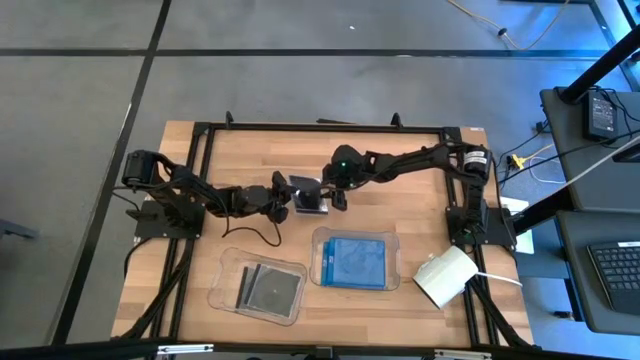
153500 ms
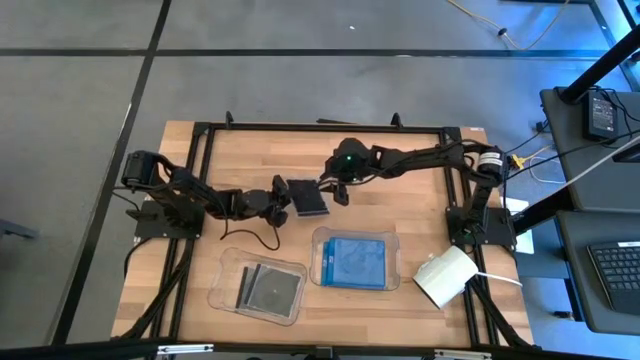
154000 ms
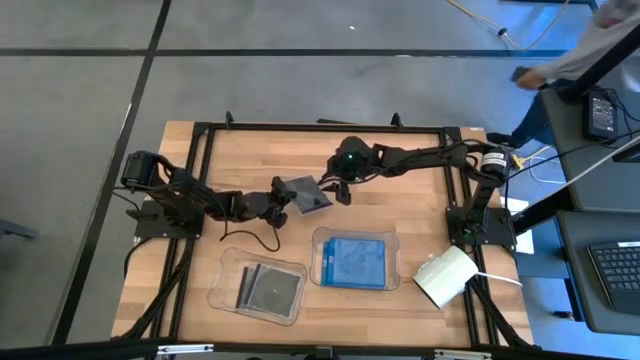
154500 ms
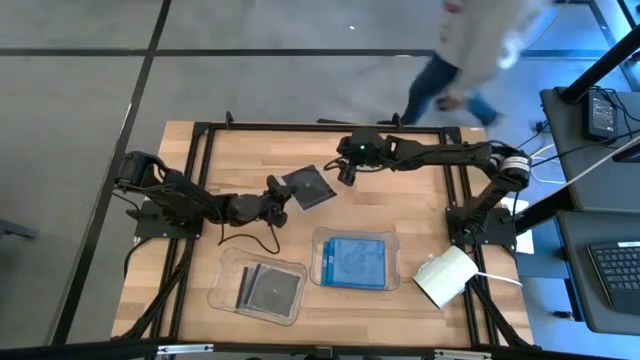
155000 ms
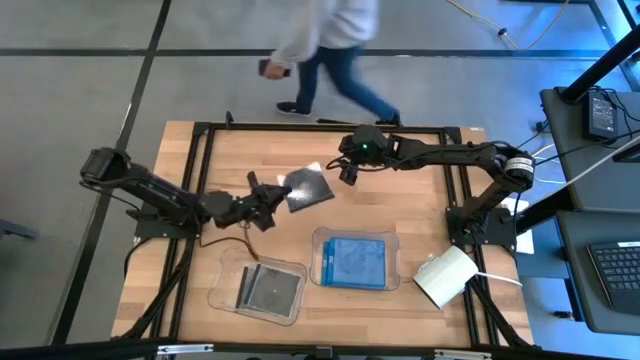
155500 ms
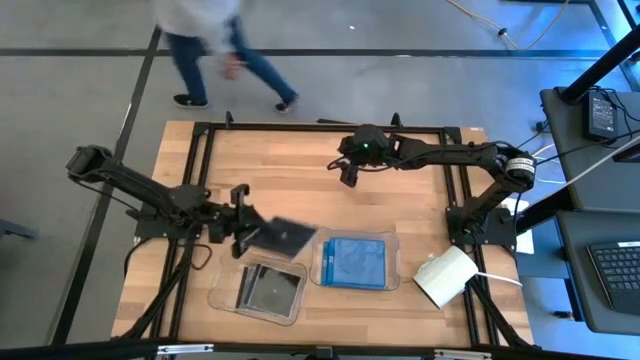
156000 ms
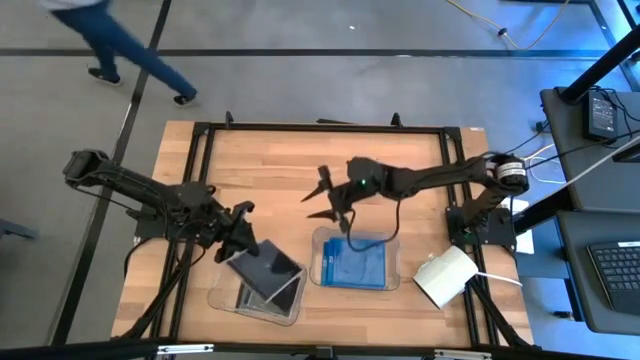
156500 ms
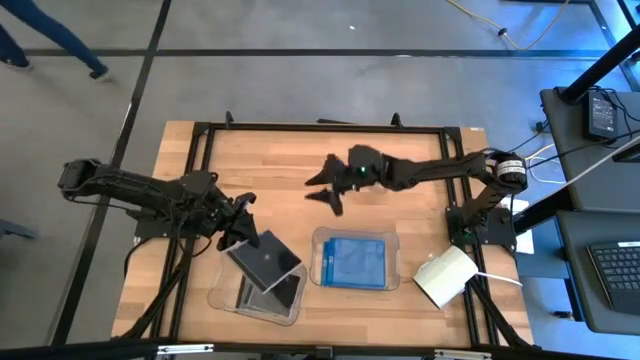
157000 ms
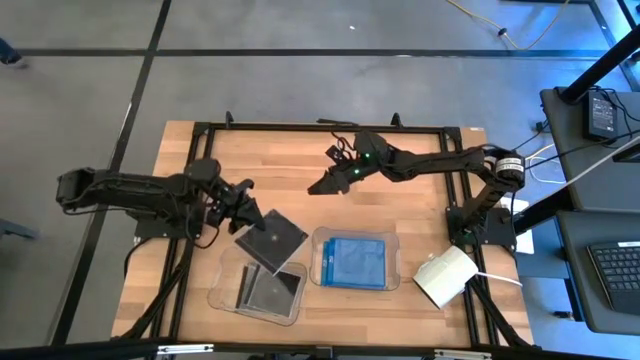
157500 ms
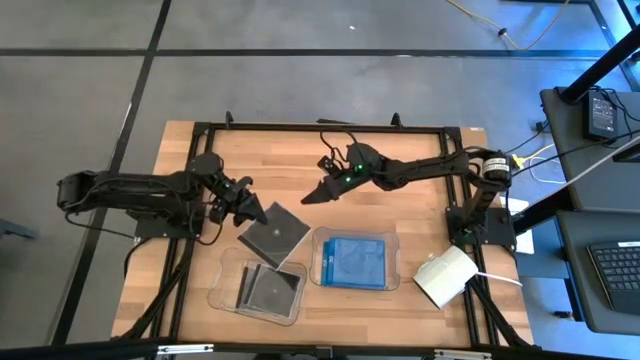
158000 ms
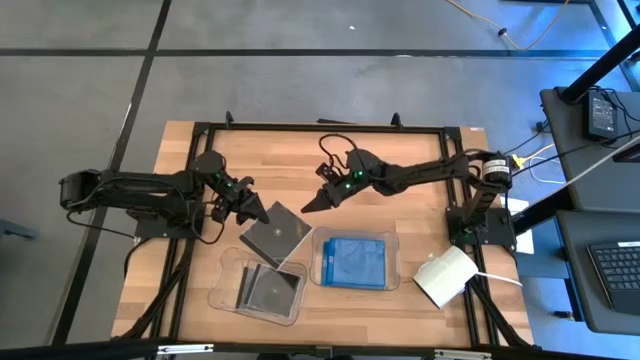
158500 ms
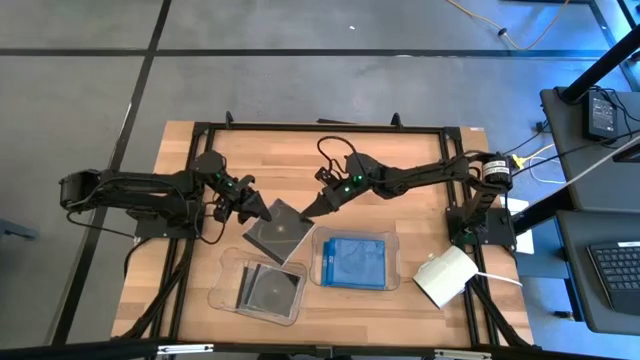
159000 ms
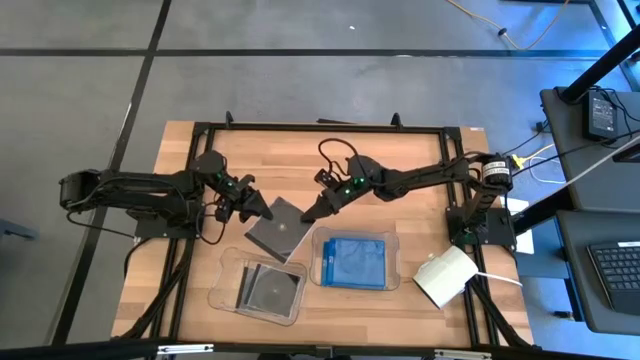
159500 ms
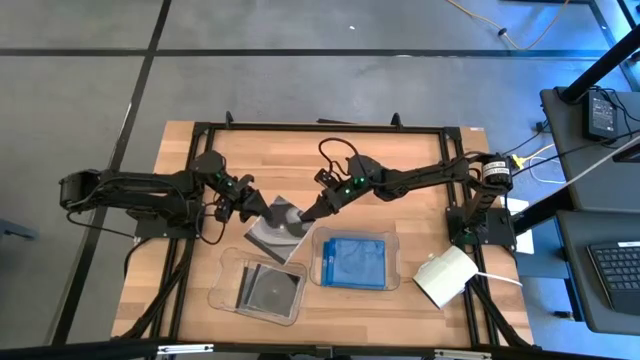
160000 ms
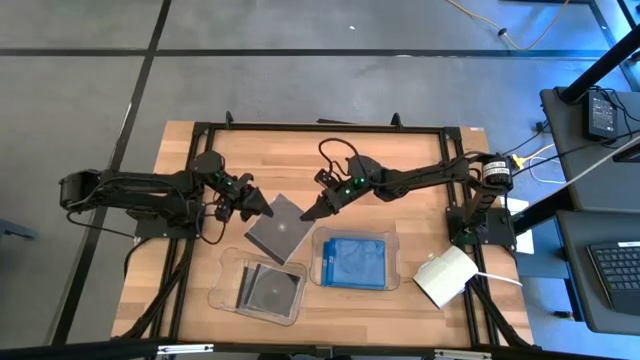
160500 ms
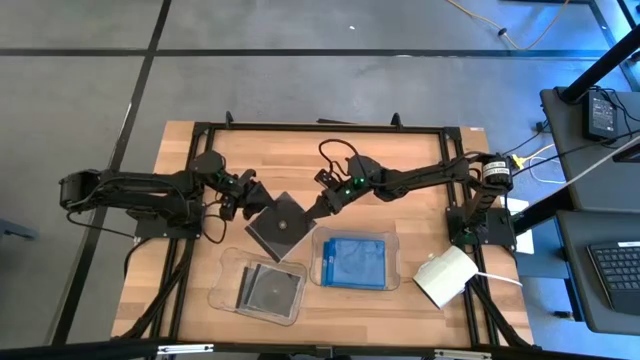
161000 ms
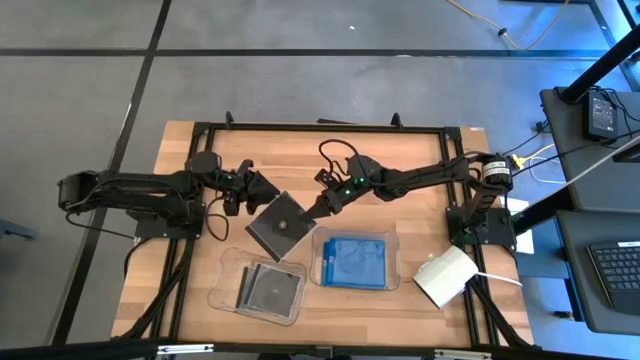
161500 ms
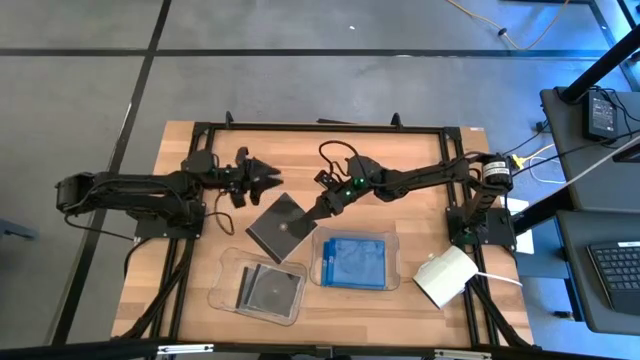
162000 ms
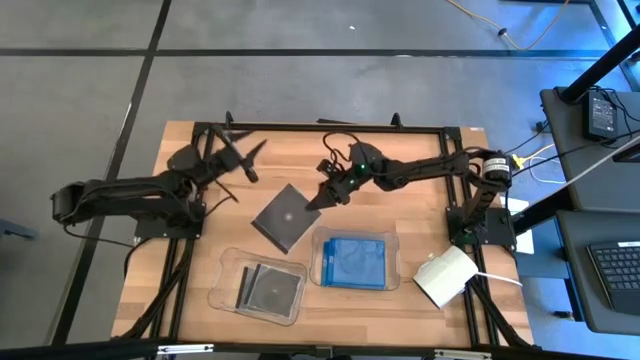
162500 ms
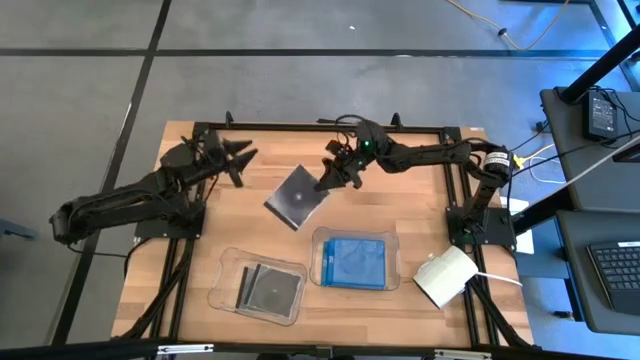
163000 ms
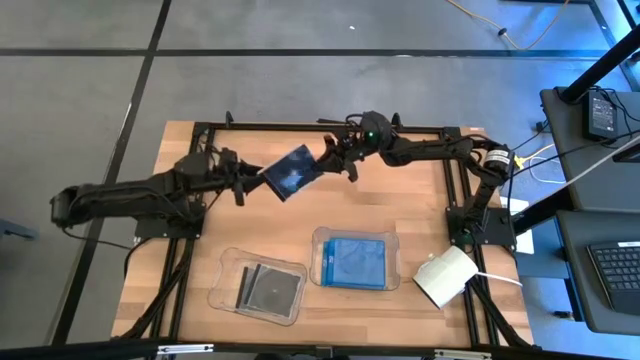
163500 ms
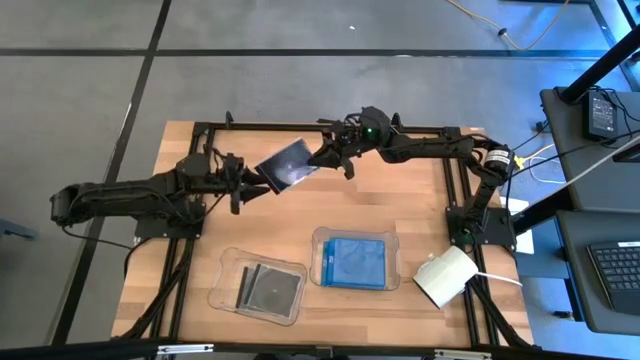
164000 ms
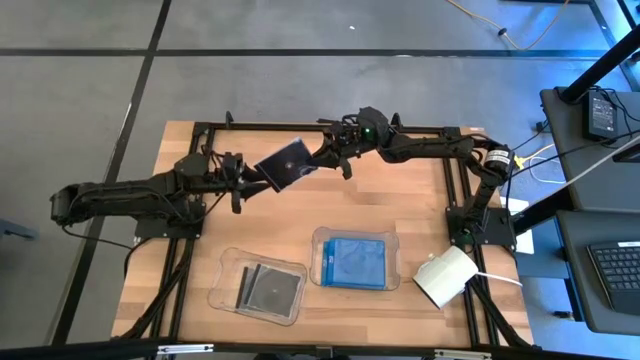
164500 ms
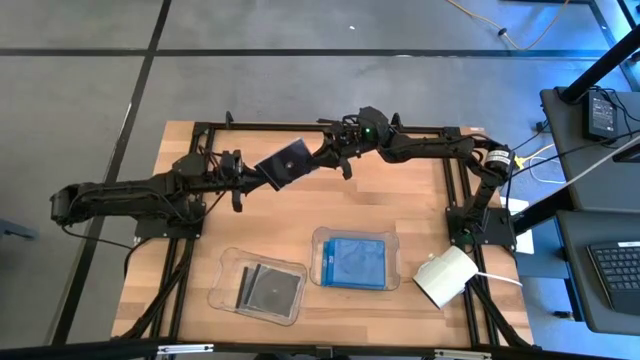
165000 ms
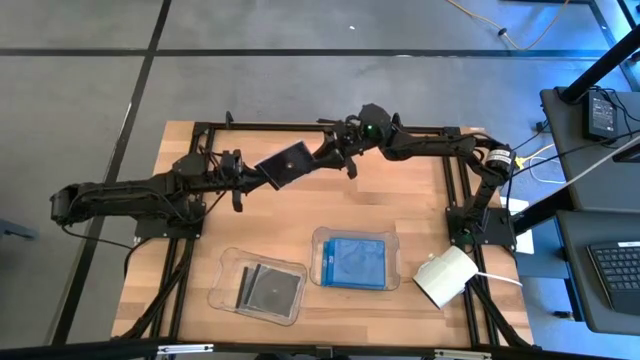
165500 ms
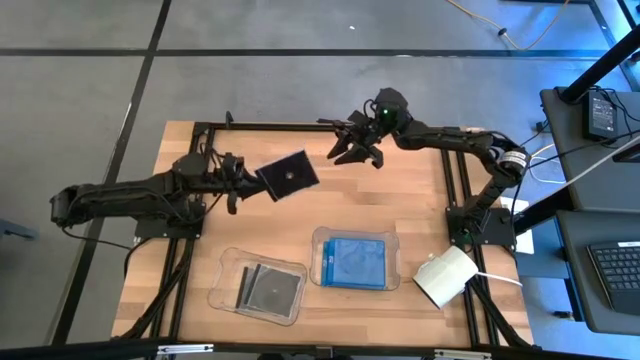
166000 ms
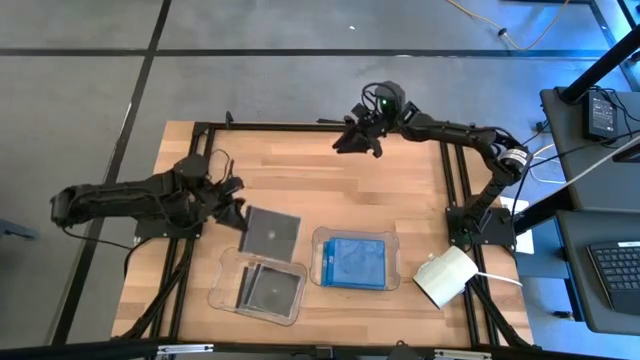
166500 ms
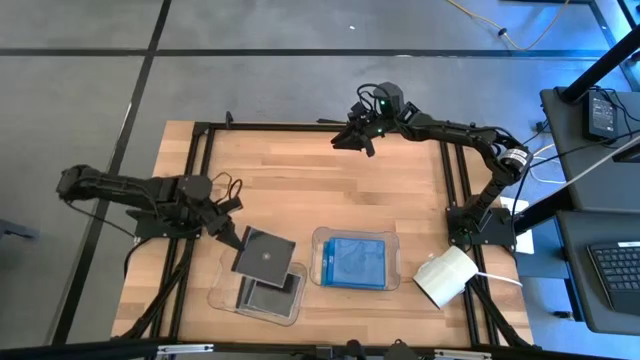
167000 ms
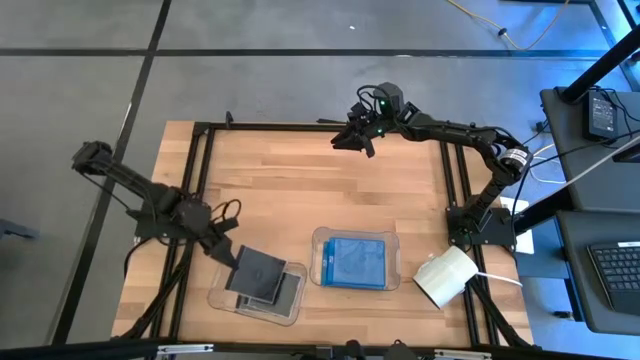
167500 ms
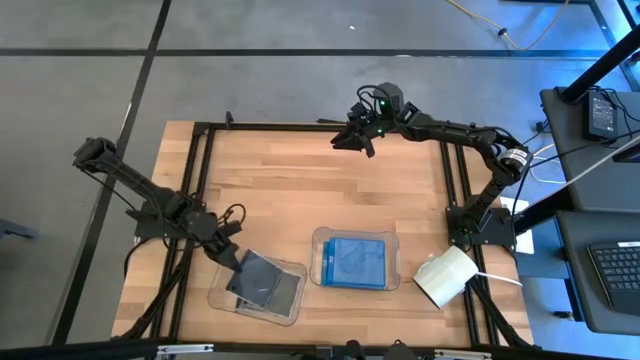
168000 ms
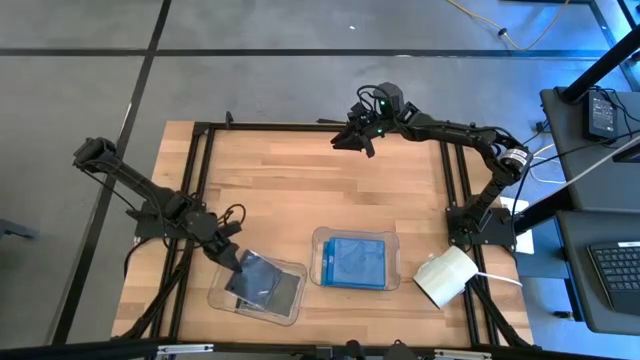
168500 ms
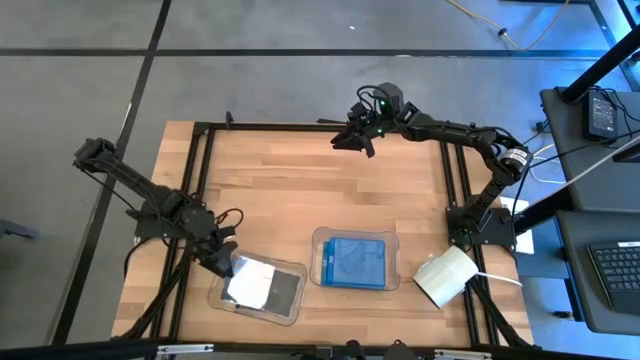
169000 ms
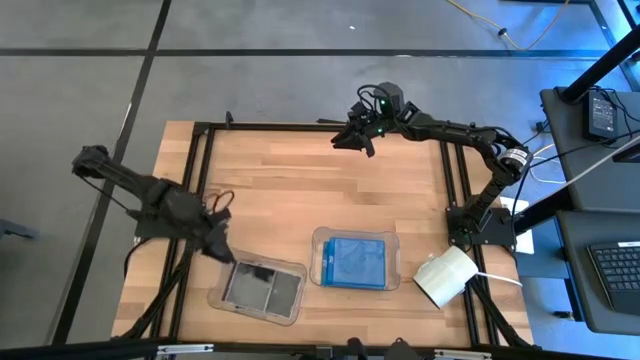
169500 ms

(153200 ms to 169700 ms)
Task: Pick & place jewel cases by type
Put the black CD case into the left transparent bin

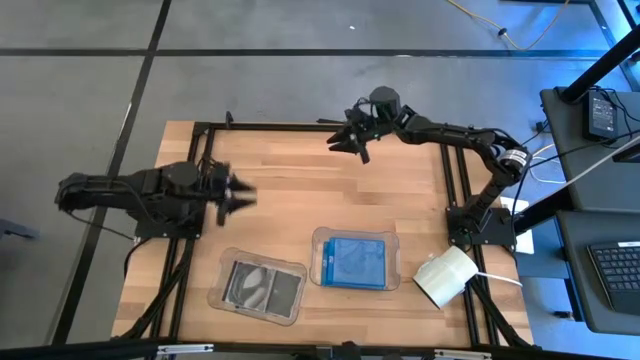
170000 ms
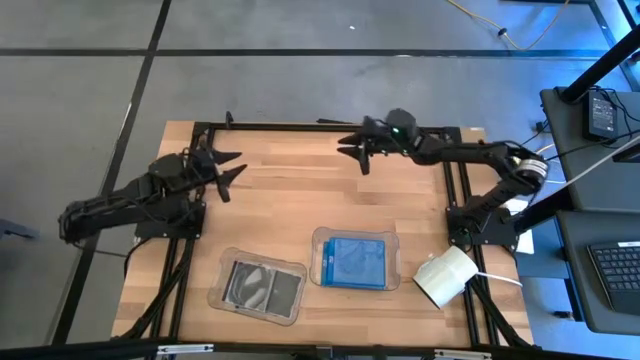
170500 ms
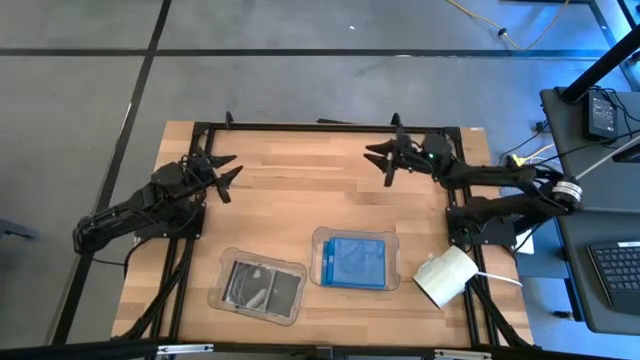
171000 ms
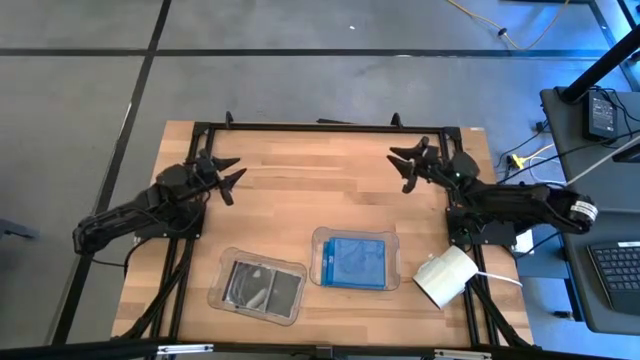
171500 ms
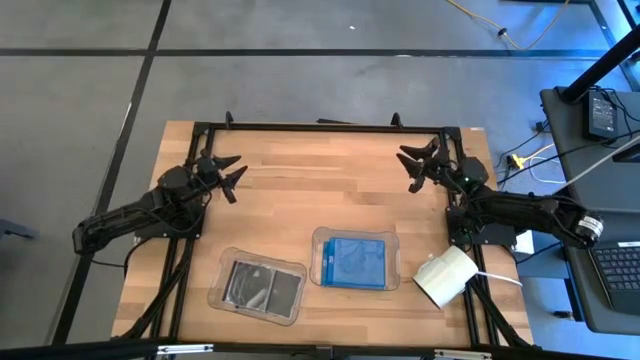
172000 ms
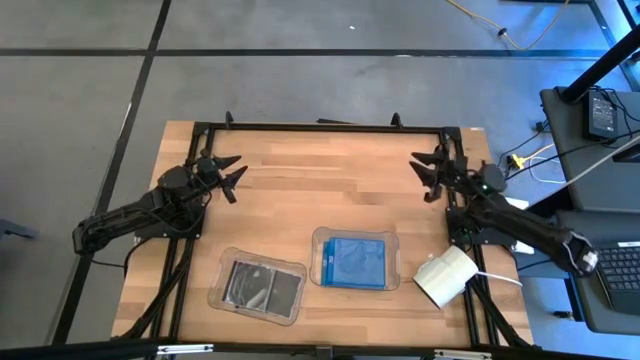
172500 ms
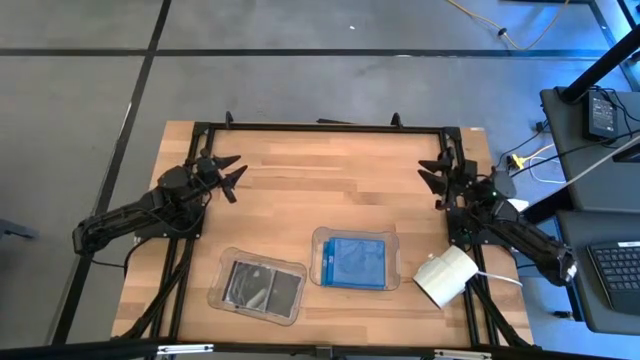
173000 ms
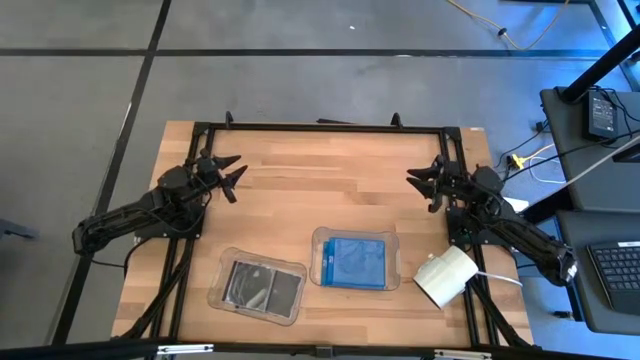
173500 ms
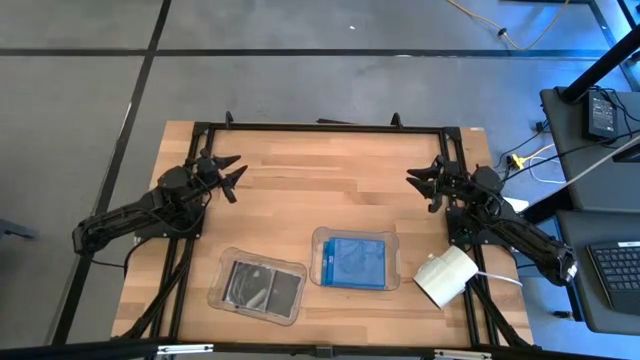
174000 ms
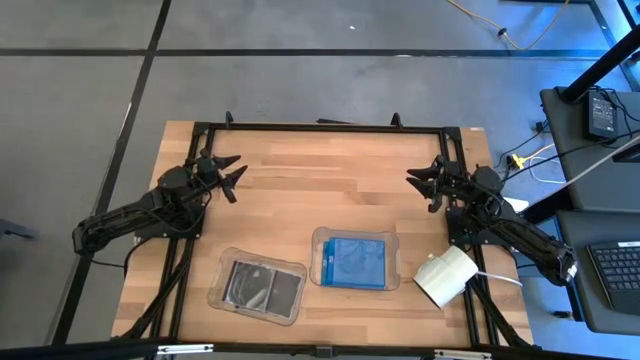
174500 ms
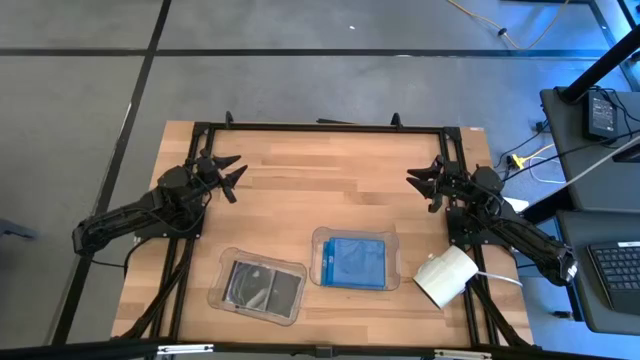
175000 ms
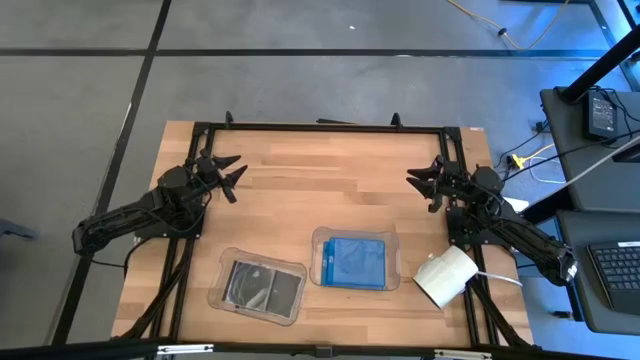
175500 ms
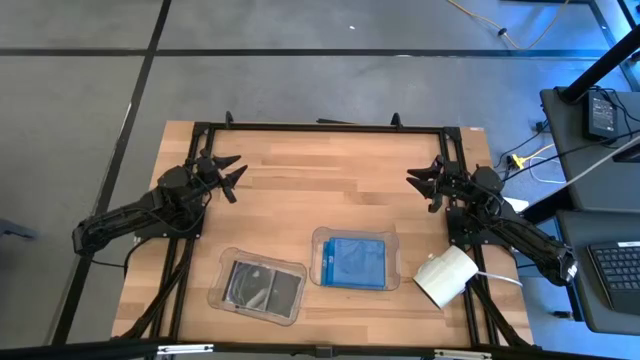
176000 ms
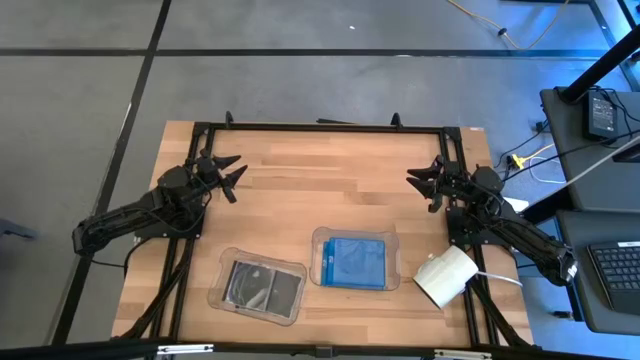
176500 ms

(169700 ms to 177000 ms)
Return to Home Position
